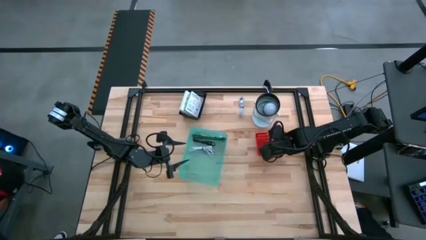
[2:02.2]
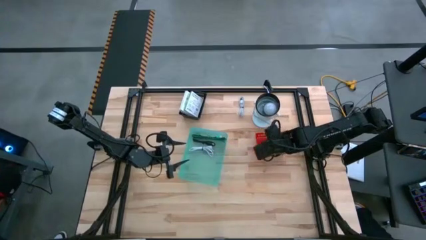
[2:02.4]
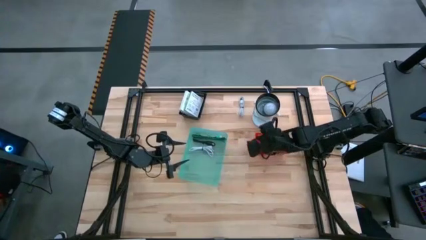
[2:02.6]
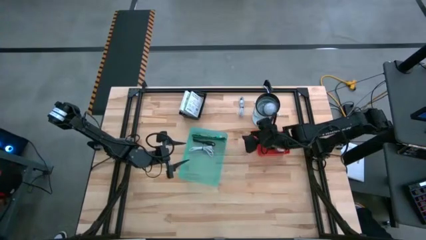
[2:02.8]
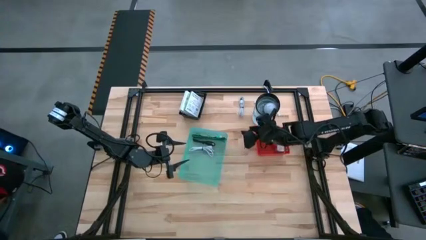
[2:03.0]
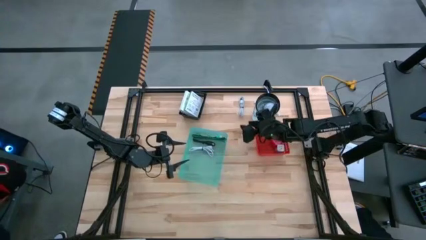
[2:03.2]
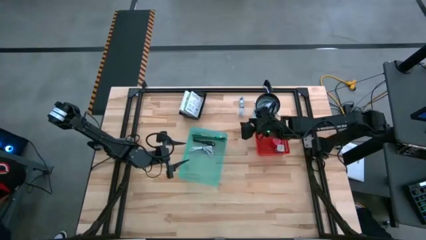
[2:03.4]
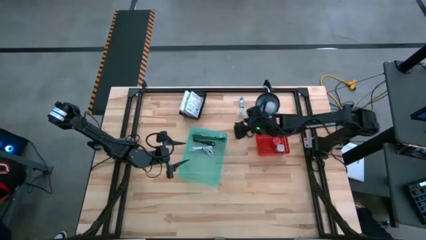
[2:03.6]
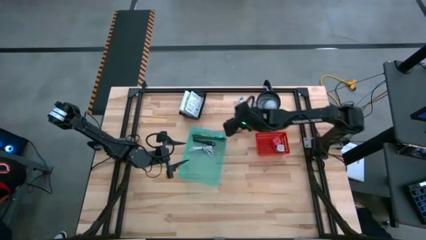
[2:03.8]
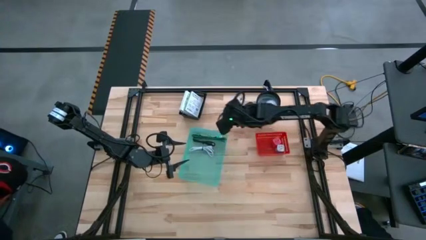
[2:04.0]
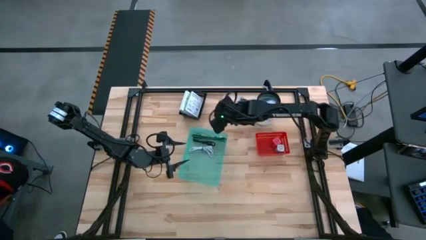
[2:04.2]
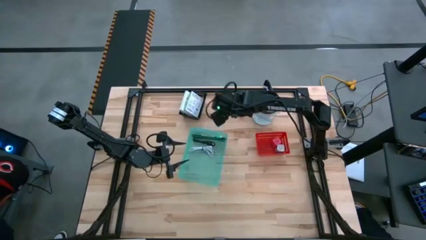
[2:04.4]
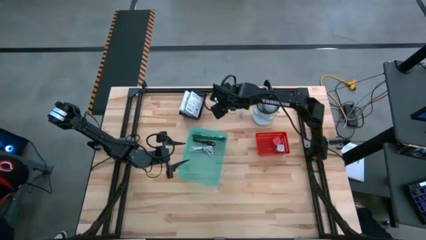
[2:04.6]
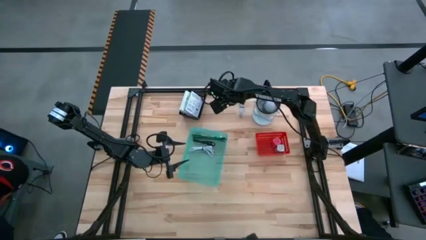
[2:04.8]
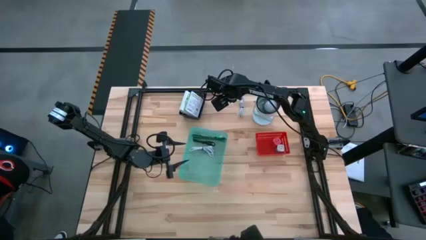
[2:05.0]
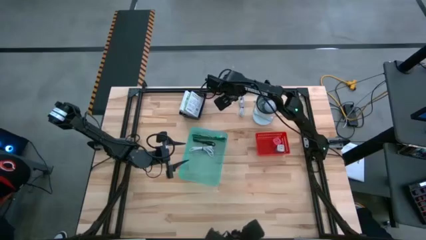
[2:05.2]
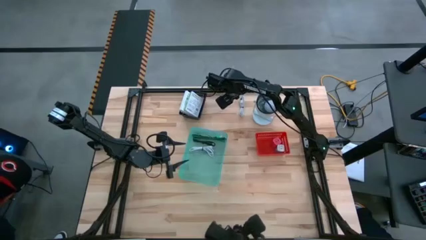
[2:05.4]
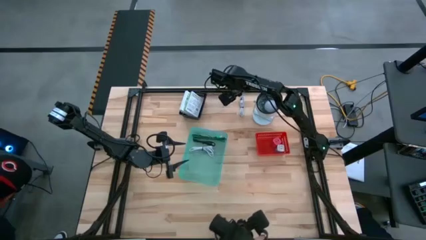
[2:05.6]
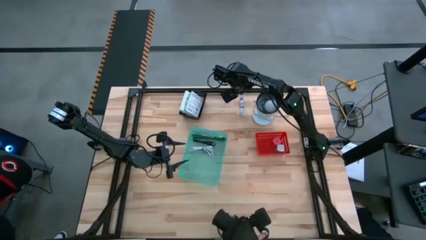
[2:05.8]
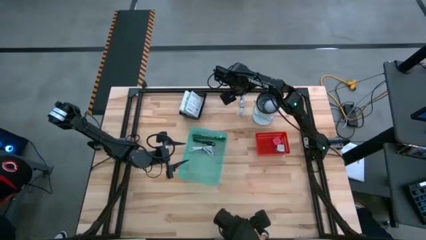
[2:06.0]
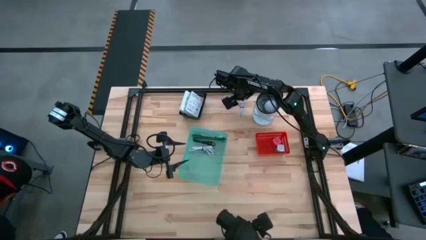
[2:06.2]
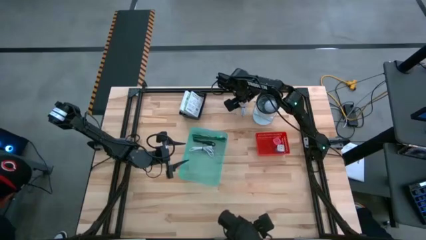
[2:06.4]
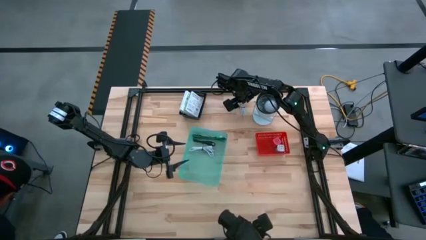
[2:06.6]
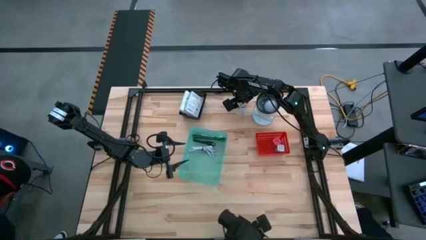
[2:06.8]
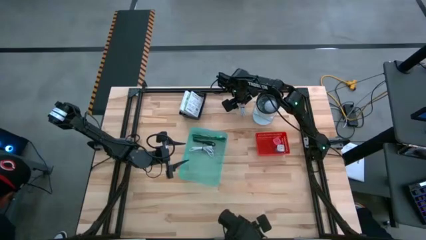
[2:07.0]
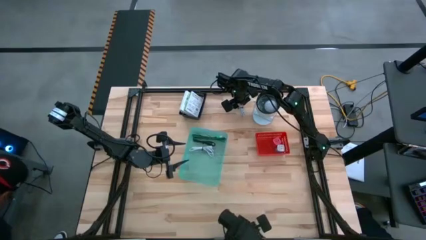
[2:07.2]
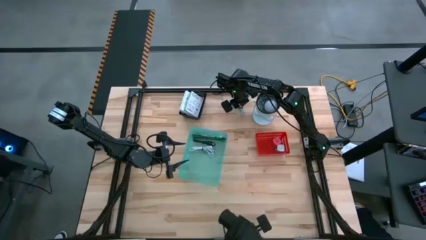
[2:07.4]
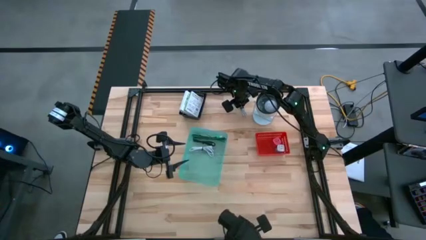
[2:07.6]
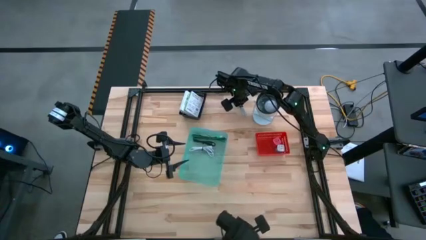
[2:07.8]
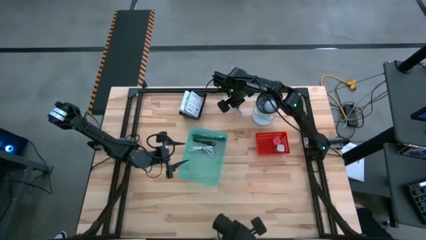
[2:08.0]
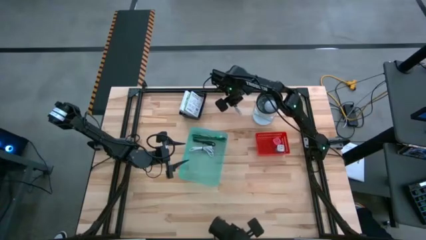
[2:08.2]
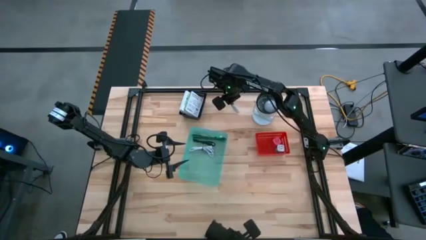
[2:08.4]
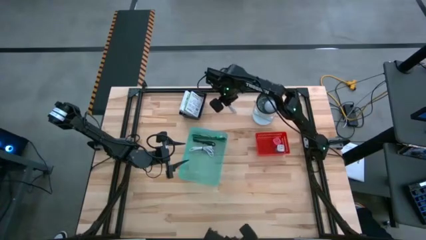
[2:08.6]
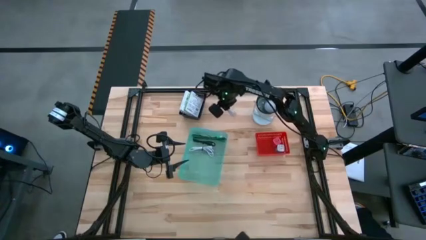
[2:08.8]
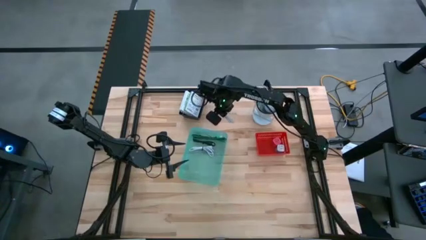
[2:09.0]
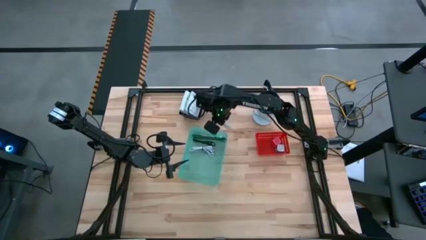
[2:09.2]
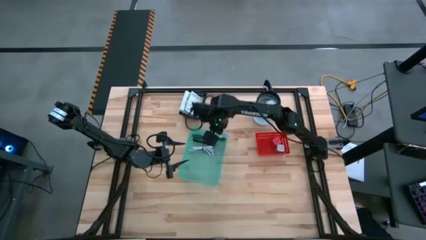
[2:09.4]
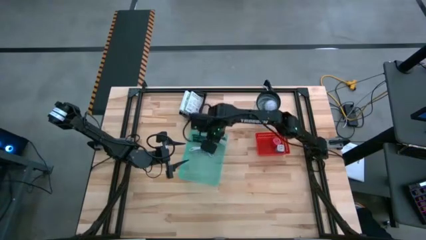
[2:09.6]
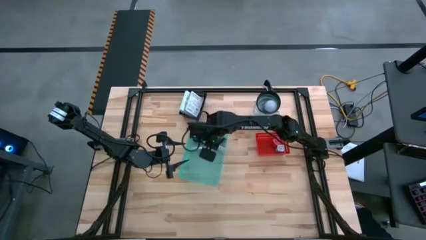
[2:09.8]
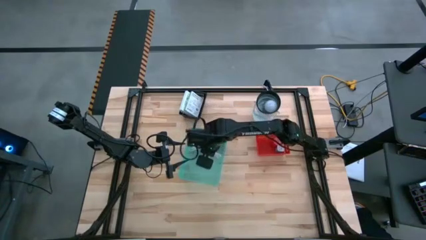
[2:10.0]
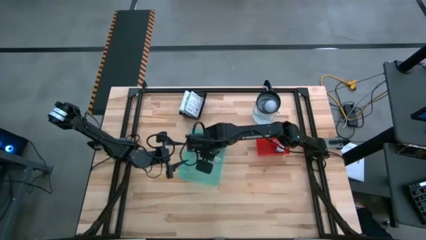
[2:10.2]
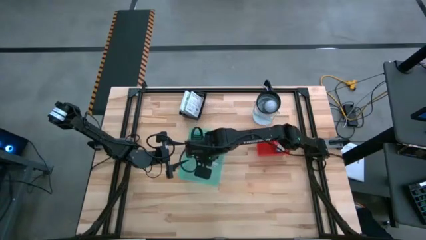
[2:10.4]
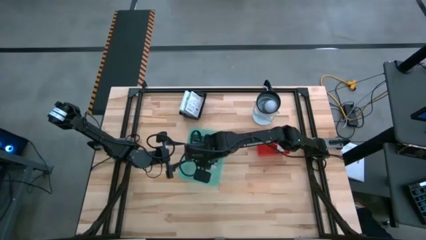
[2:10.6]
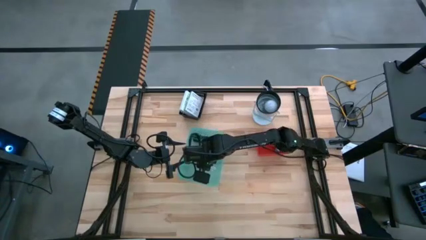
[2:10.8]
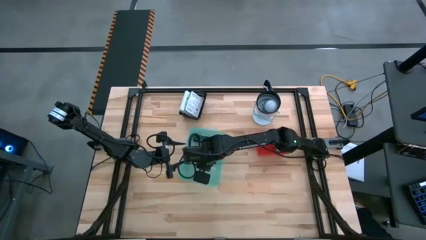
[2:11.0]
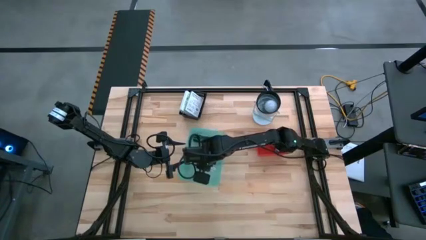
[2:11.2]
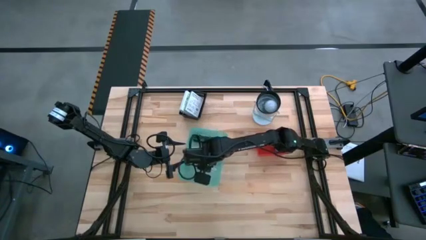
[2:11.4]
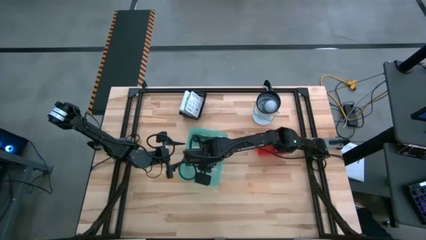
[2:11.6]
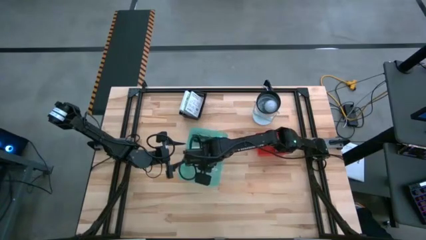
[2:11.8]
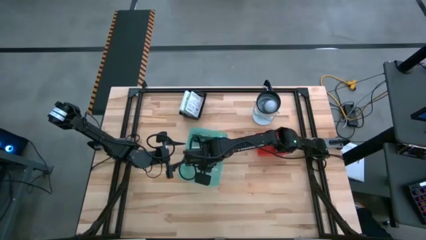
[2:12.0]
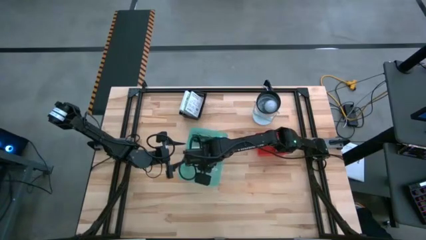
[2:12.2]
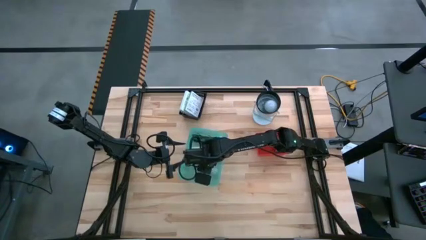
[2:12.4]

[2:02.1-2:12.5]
Task: Pick and place items into bin
Put the white charger cable into the green bin

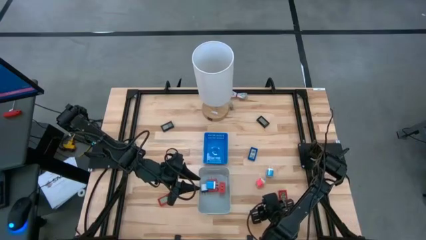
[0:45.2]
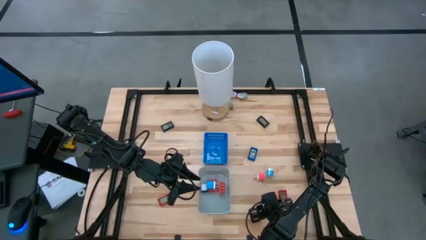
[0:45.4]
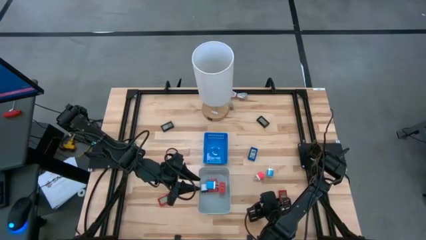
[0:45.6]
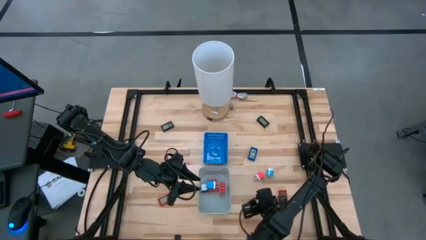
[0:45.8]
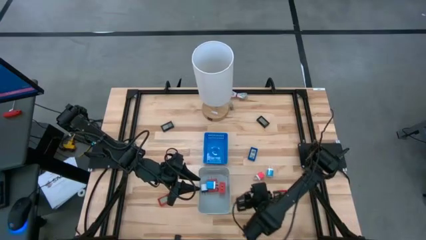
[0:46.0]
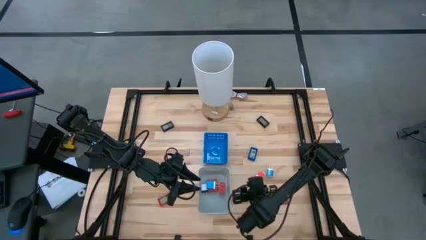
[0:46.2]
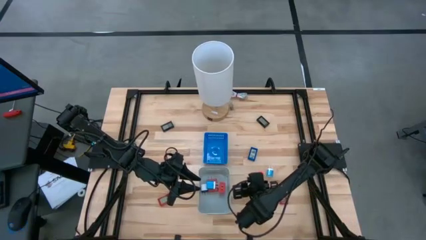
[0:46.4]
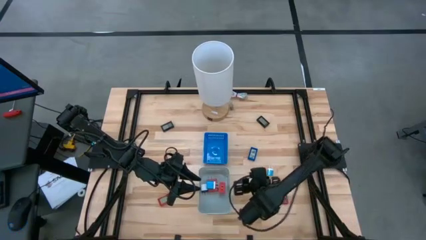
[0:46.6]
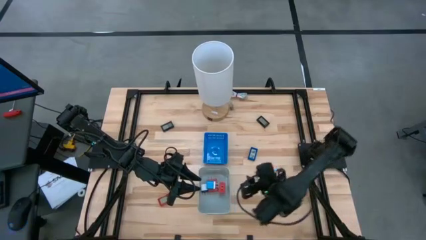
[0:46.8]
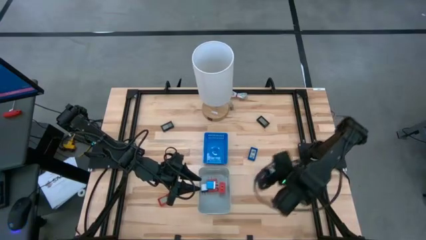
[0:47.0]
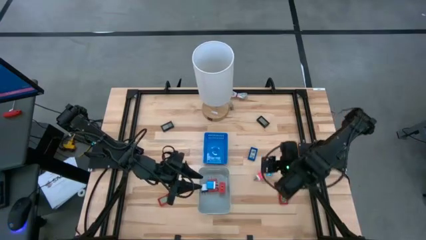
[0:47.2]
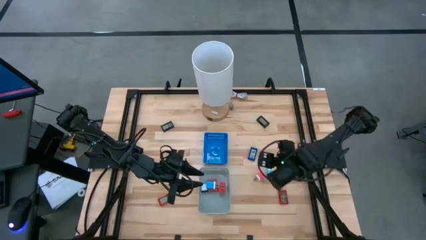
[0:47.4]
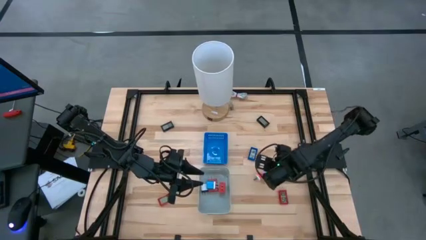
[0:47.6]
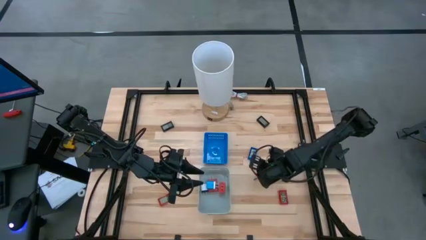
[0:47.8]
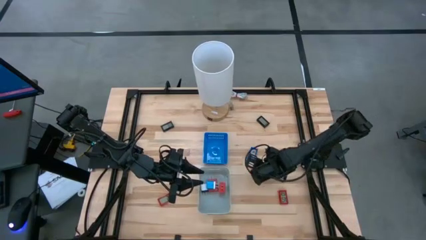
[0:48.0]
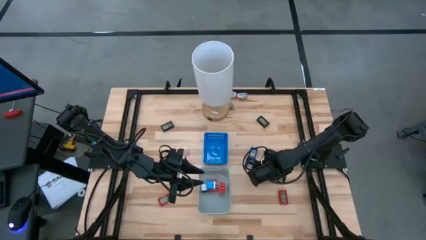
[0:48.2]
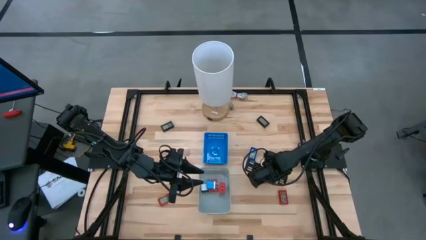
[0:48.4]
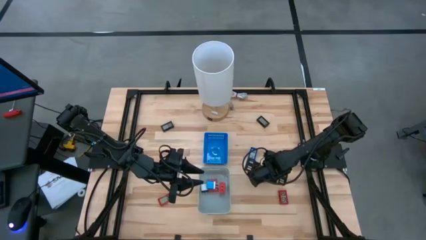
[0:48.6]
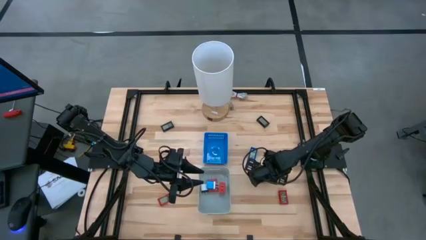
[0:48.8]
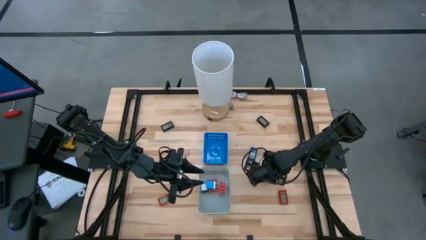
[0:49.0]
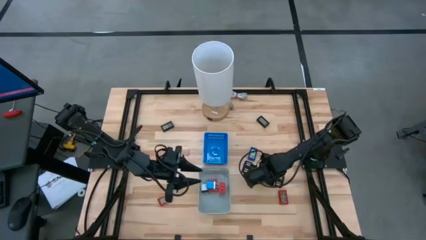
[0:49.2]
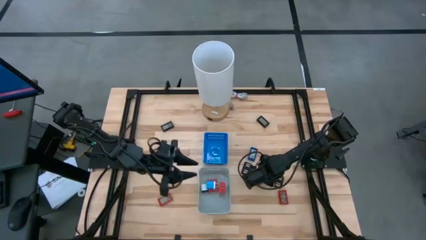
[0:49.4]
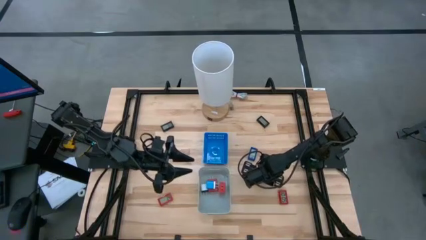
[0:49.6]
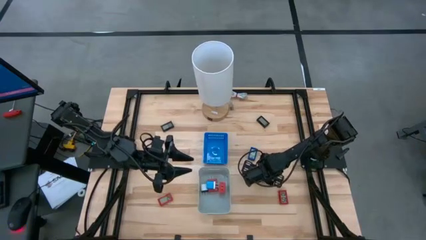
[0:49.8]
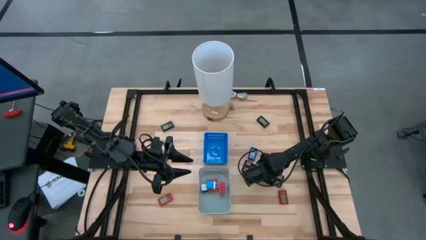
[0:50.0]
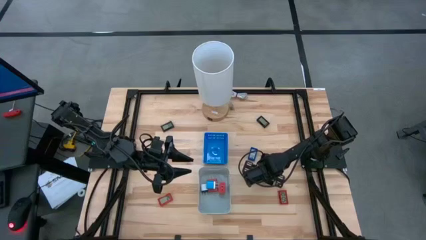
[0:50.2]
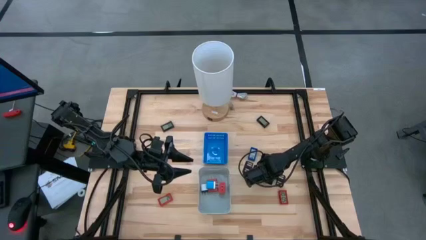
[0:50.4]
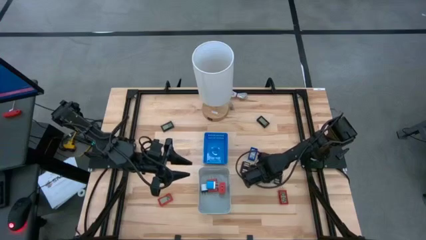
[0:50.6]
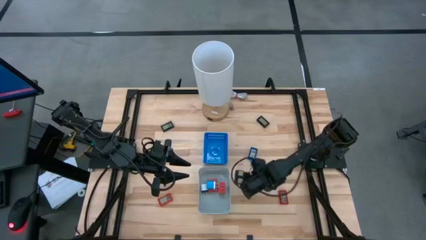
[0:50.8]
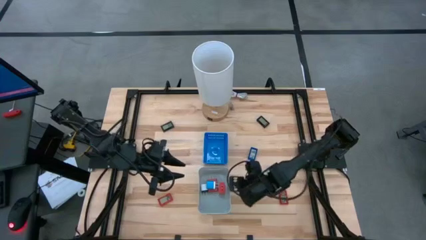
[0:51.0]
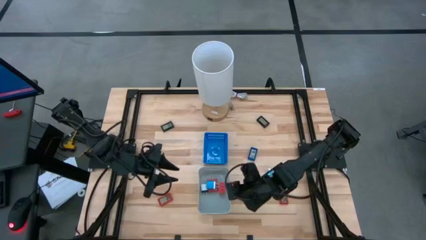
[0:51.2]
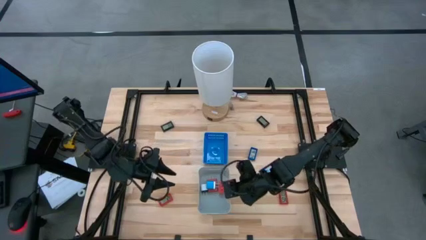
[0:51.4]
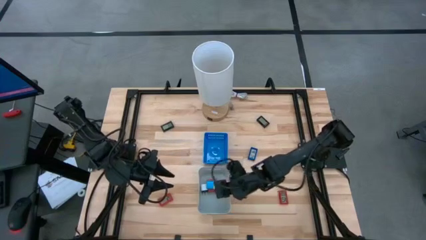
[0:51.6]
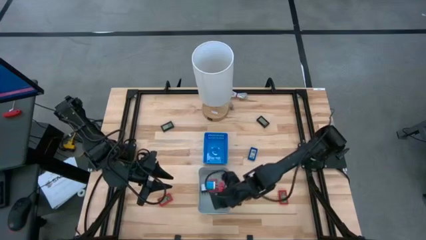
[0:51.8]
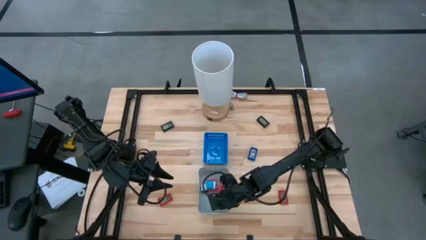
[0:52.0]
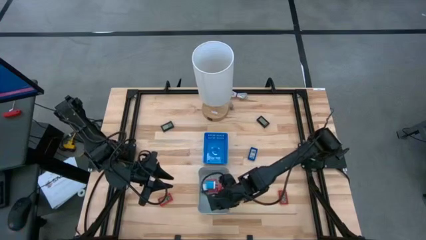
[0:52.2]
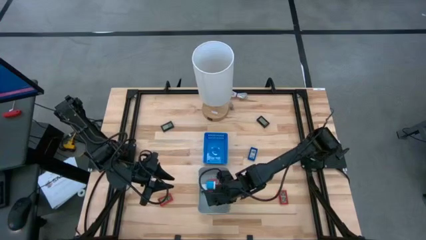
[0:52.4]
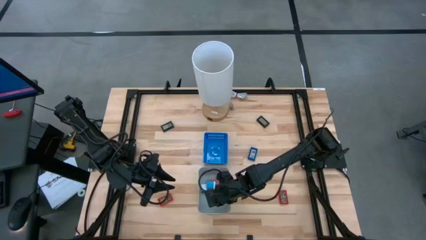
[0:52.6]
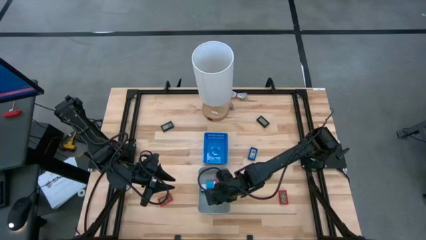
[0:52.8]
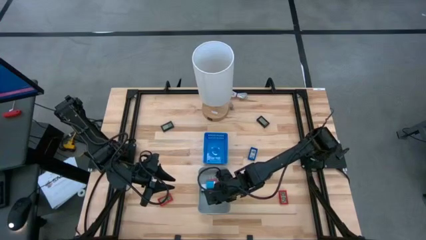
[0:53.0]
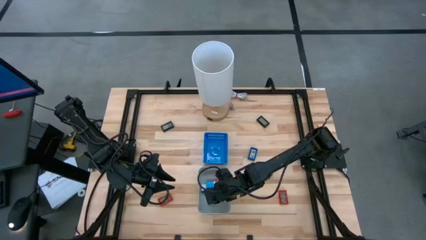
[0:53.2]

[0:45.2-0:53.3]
Task: Pick & Place Office items
Put the pink charger adapter into the gray bin
